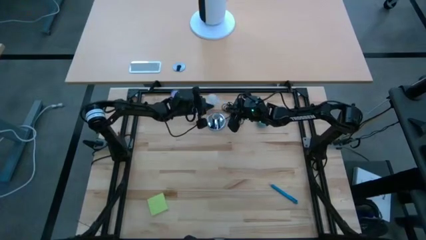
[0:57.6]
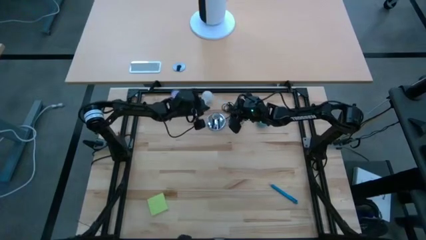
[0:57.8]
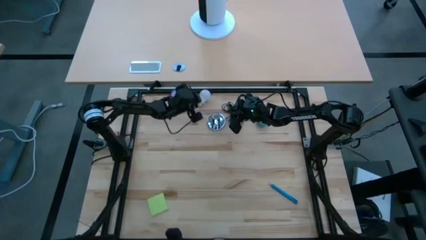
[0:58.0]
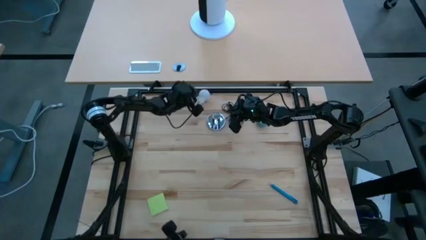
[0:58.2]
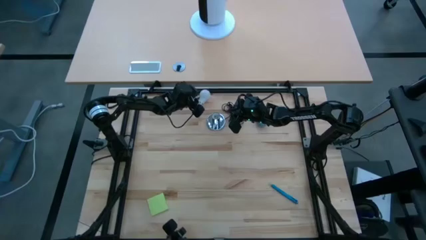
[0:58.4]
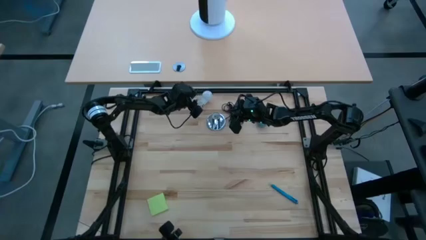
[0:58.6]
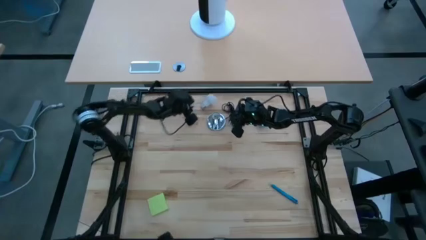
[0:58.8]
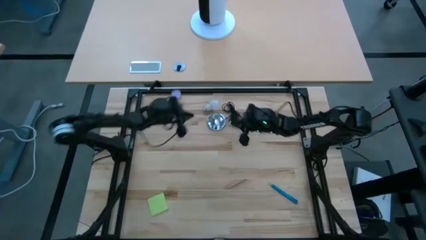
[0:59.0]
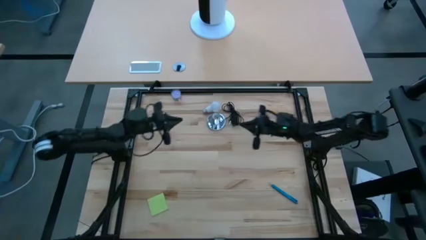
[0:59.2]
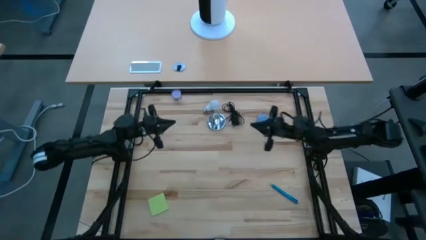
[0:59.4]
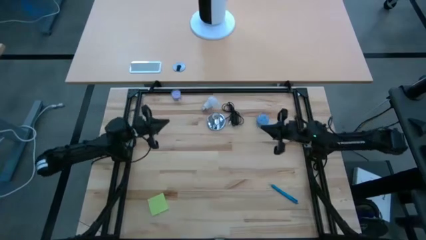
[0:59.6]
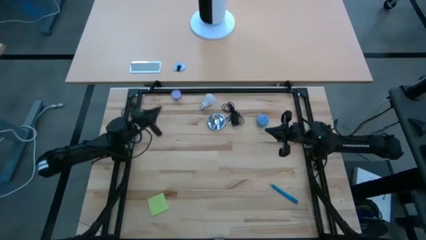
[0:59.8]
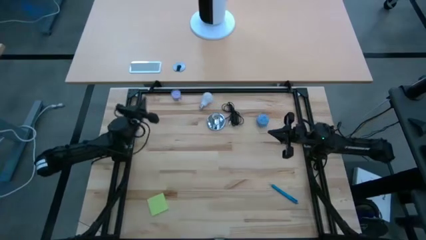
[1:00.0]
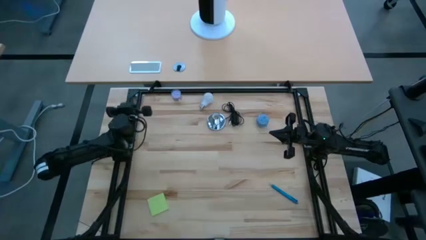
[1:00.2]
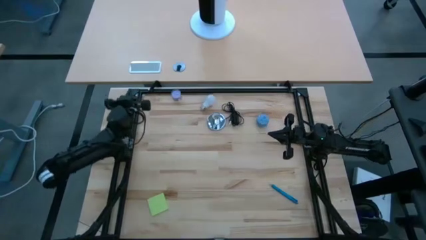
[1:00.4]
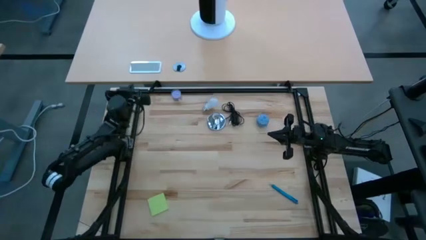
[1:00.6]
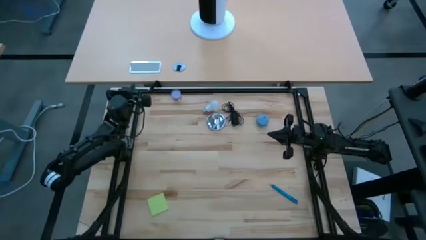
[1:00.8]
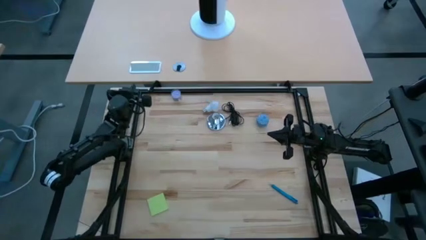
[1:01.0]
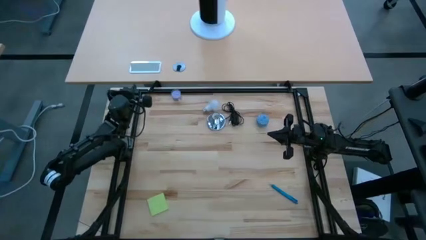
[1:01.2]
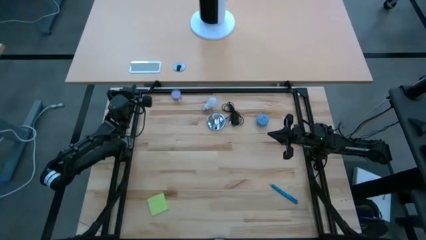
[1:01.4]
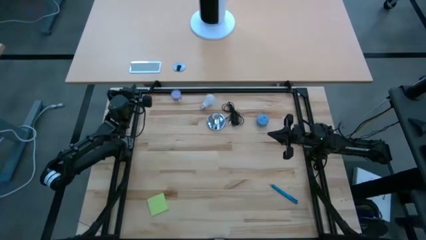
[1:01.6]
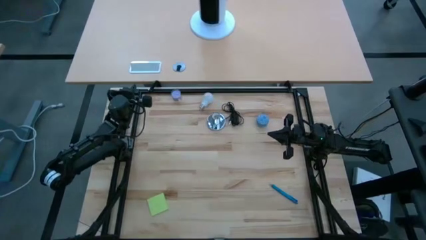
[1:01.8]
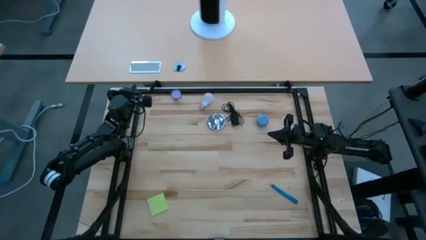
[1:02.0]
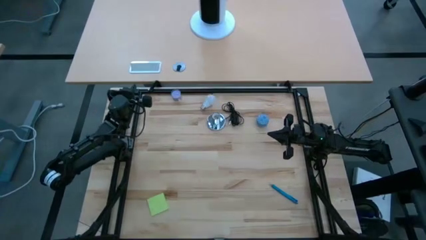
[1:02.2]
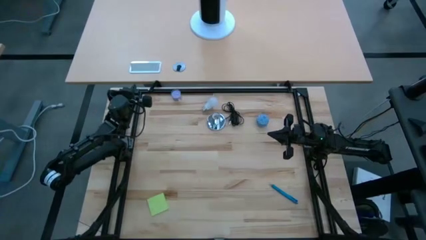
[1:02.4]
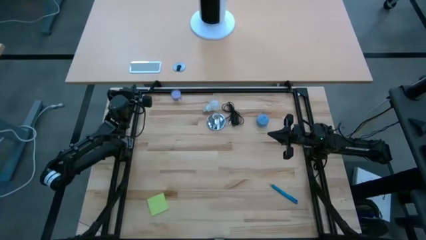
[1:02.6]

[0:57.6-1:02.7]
Task: Screw lightbulb
Return to Home Position

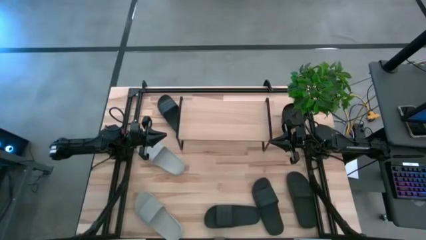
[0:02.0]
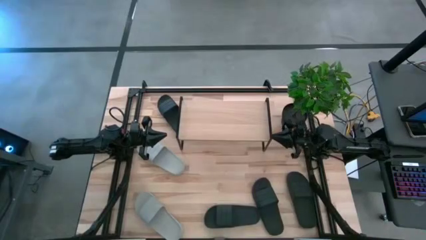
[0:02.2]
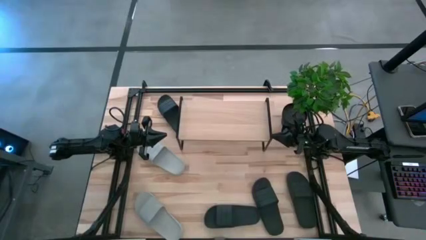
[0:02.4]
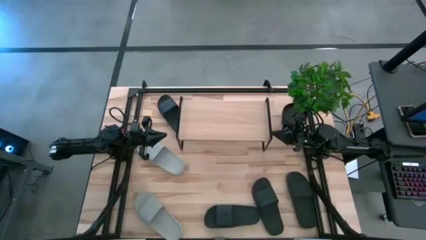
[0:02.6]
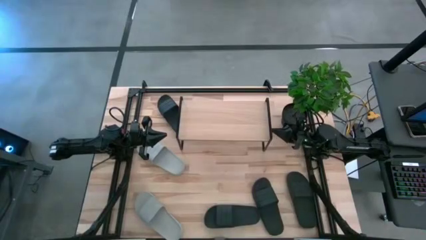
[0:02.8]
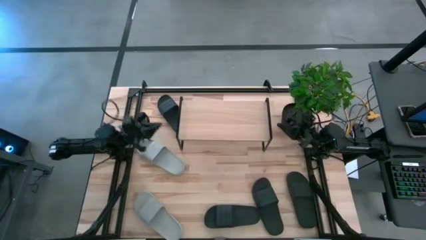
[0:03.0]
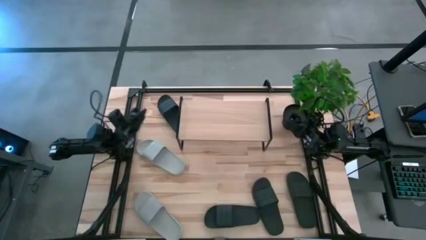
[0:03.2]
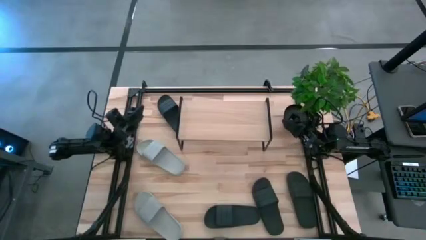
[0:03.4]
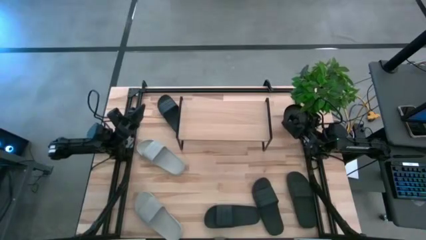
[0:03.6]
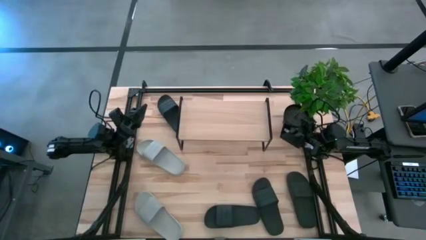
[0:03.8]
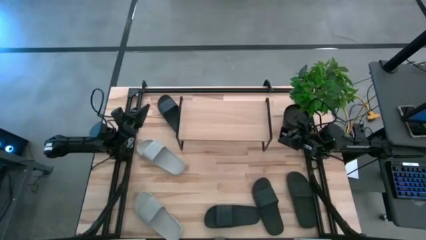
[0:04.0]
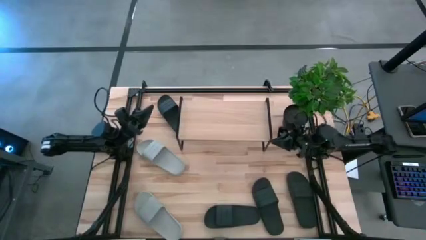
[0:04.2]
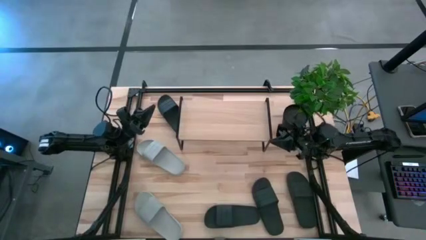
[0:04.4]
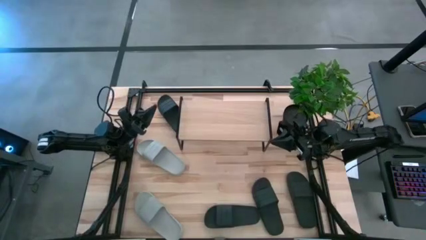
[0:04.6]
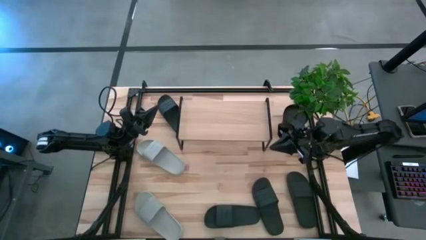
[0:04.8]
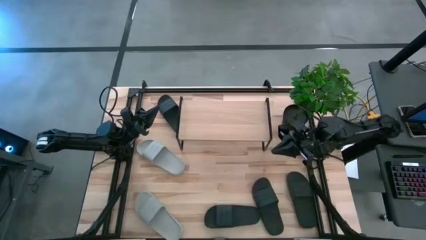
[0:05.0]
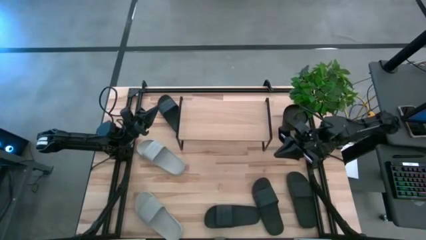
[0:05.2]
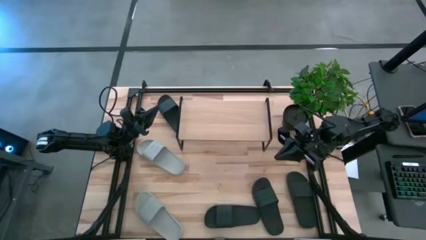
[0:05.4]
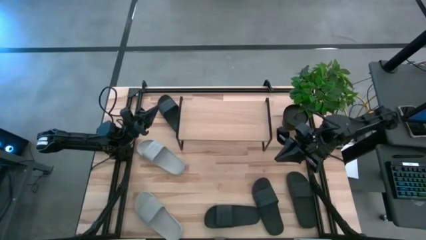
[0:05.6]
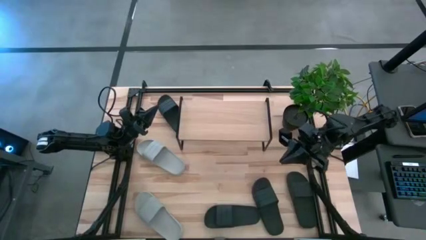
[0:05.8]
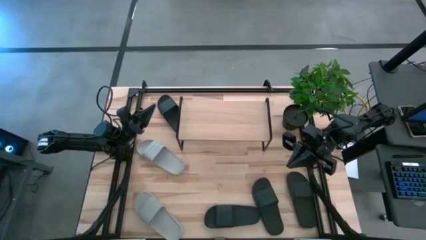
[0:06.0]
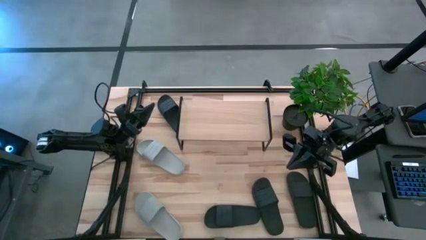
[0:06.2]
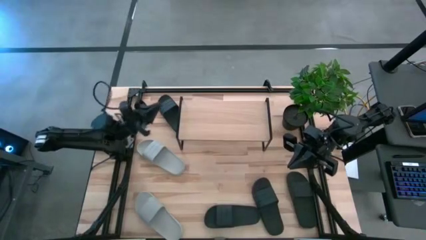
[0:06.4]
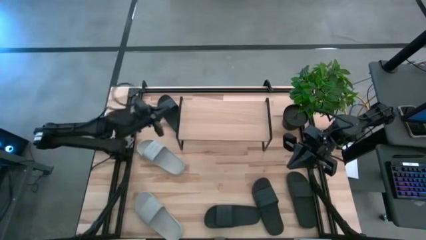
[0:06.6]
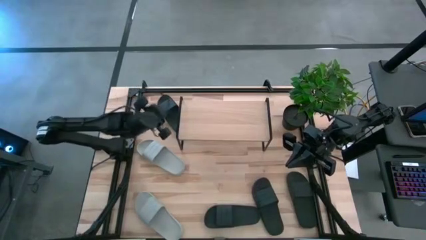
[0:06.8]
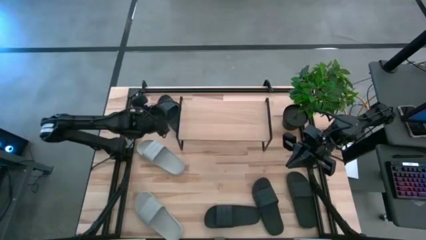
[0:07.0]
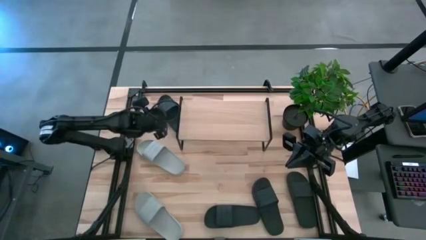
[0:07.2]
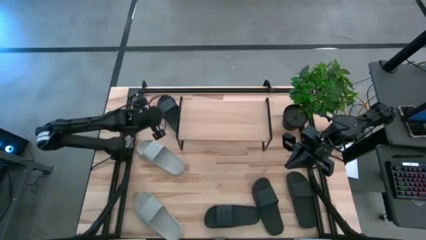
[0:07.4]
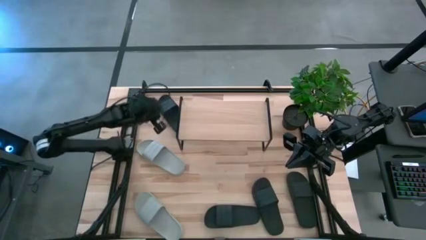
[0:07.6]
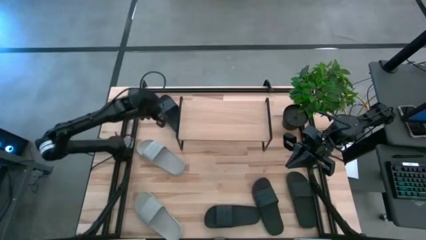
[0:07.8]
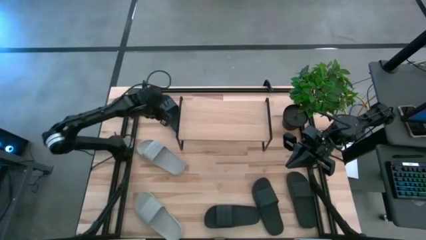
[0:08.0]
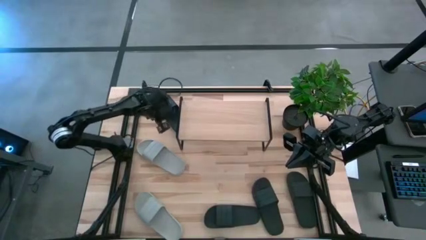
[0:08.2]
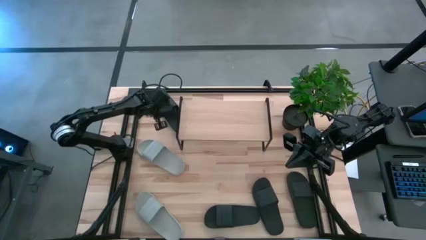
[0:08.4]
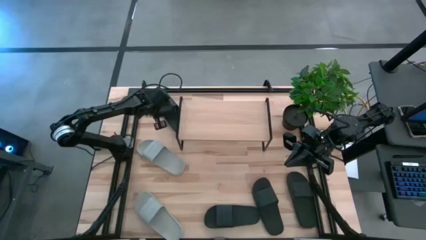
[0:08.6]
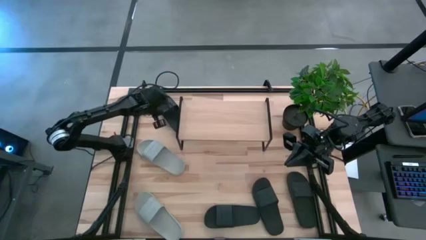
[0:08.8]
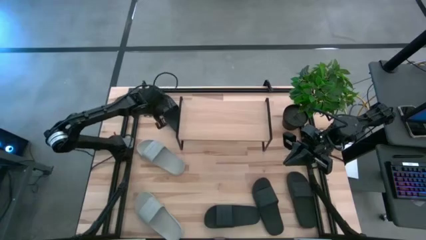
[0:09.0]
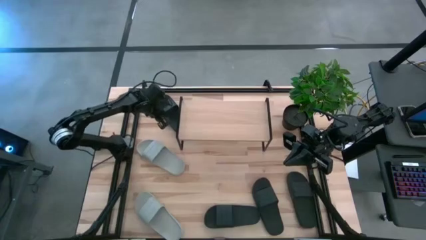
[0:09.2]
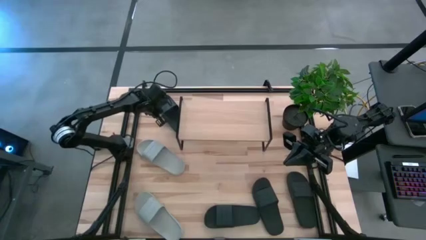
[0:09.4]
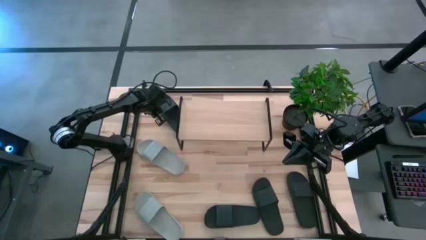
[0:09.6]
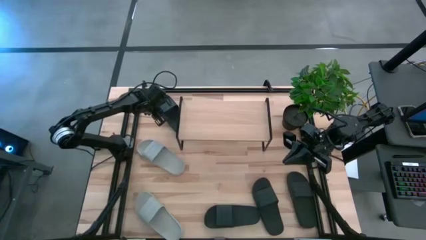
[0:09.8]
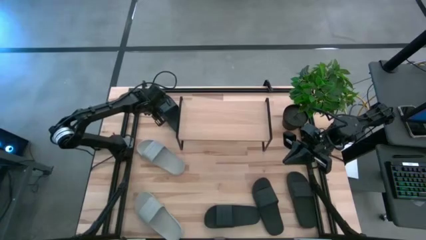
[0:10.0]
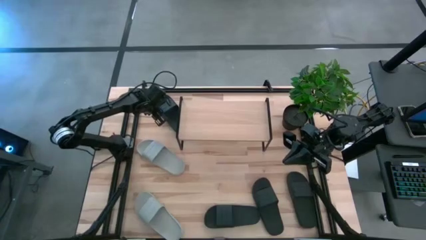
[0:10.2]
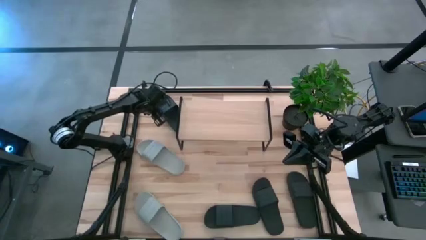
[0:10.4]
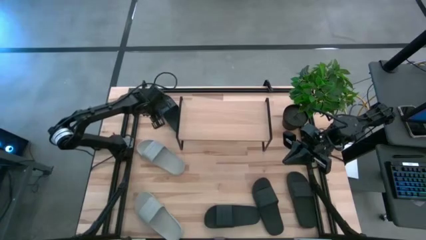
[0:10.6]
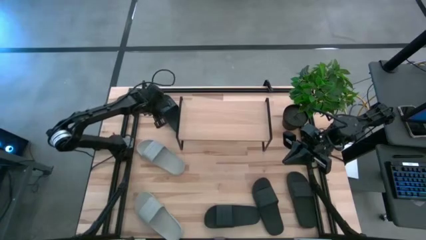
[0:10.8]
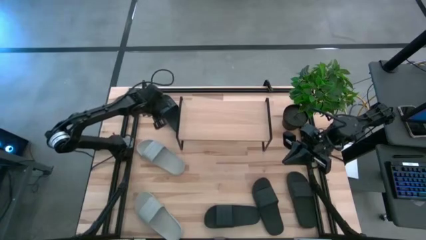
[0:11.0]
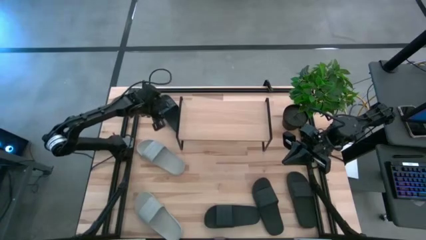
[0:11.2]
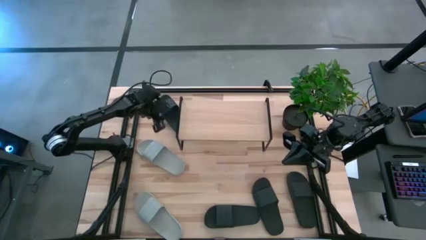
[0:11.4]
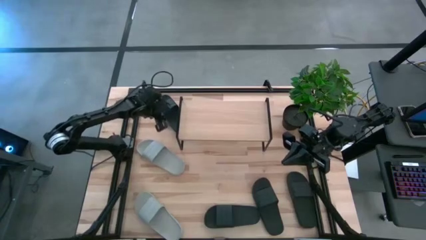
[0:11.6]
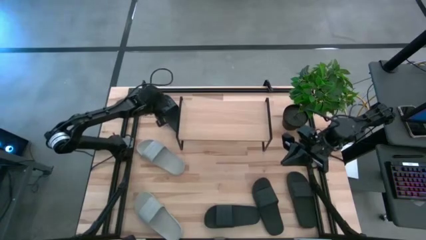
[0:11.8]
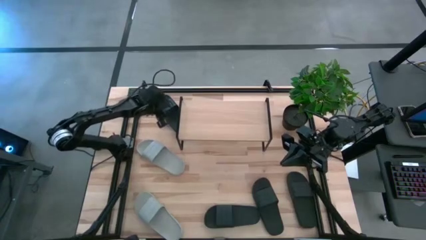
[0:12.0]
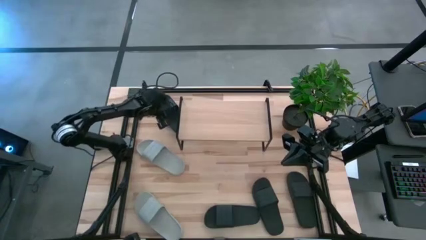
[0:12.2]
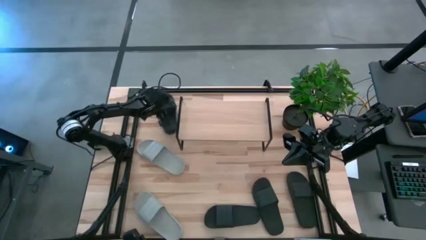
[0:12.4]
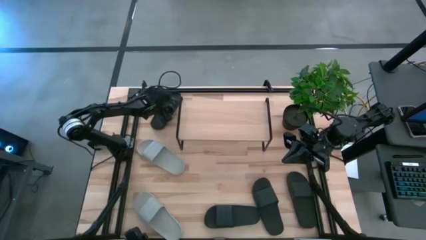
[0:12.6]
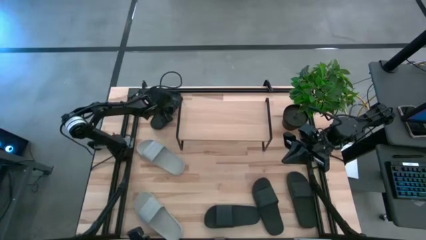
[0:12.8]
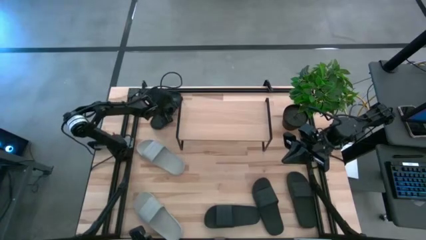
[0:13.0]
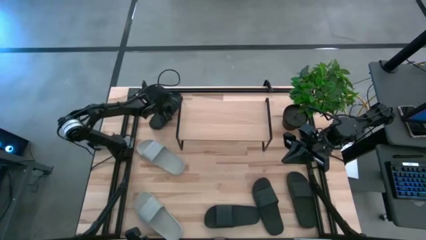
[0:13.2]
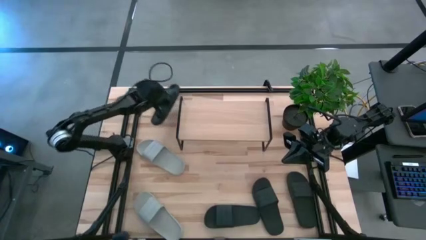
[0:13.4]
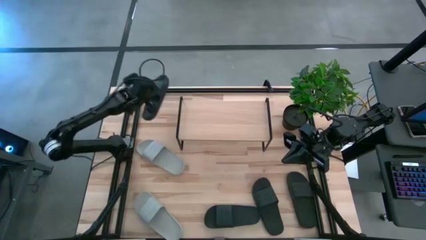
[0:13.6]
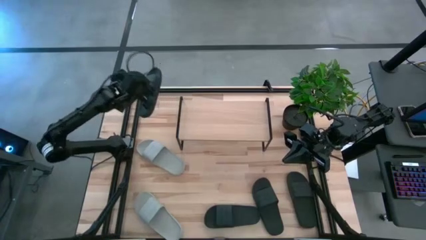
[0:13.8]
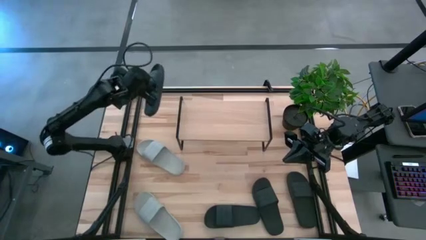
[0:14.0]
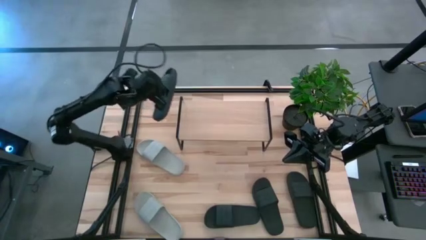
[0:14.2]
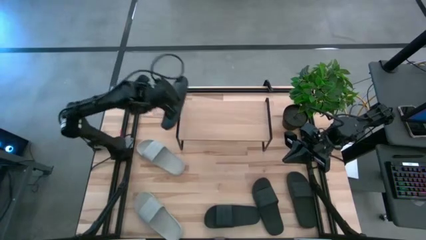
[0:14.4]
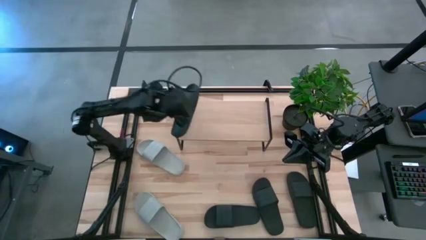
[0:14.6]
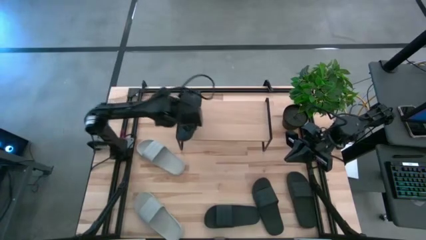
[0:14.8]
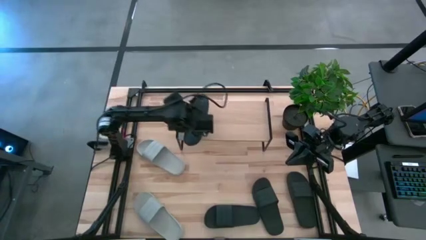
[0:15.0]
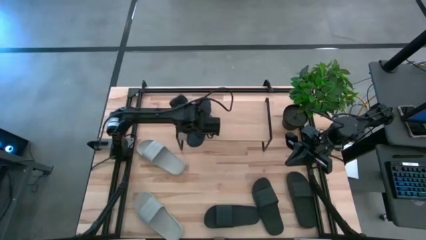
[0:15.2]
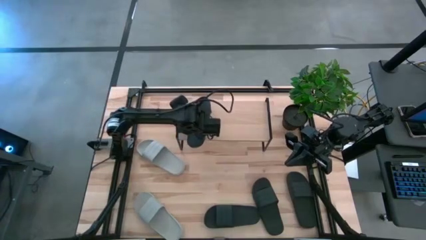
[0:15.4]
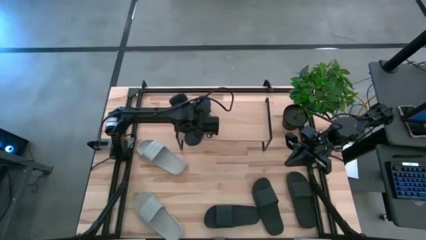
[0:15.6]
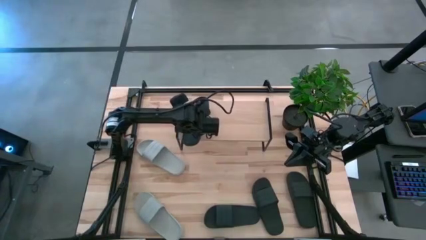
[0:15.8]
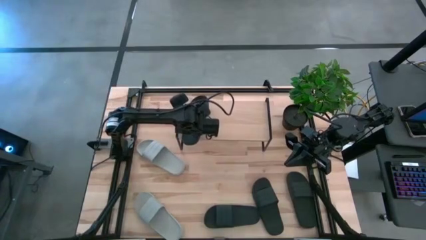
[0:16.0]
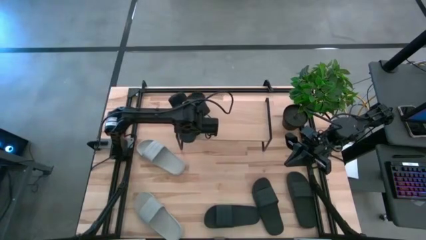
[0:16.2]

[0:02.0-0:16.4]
Task: Pick and place slides into the shelf
Put the black slipper on the shelf
